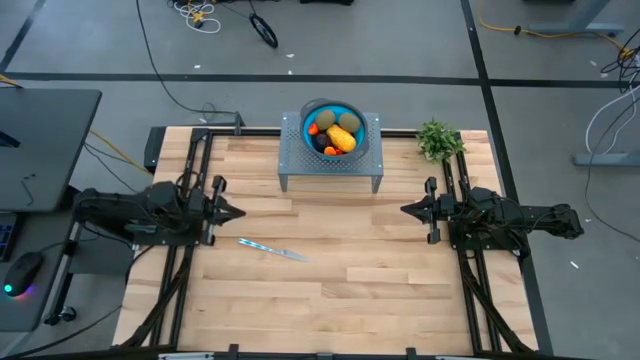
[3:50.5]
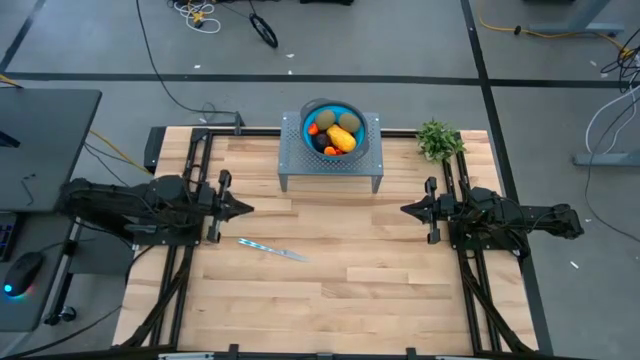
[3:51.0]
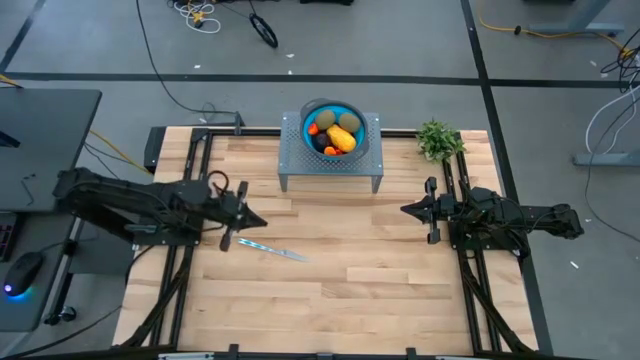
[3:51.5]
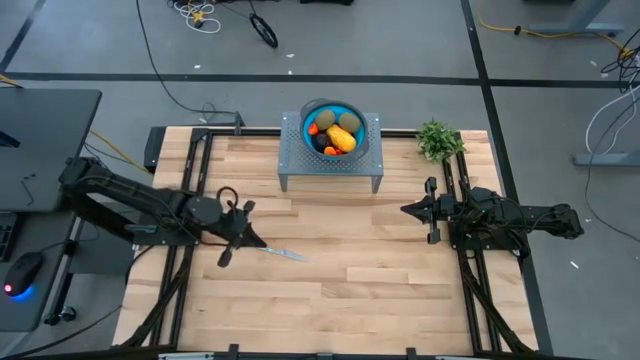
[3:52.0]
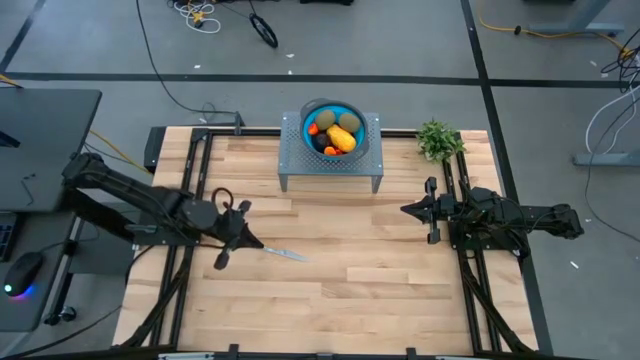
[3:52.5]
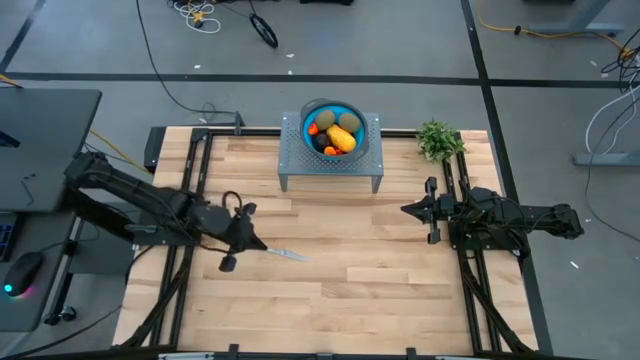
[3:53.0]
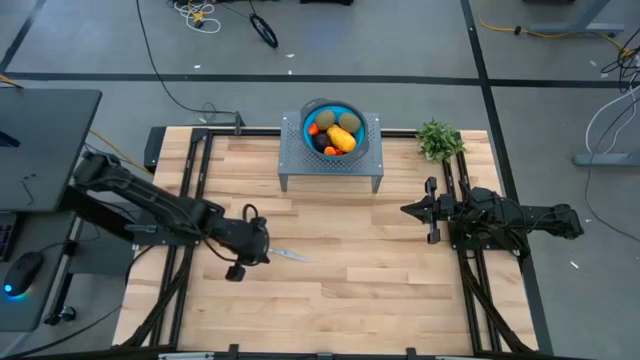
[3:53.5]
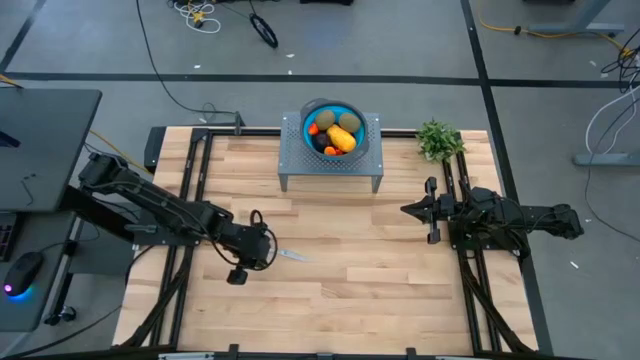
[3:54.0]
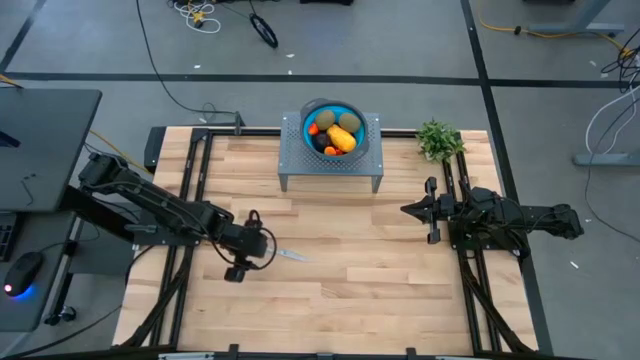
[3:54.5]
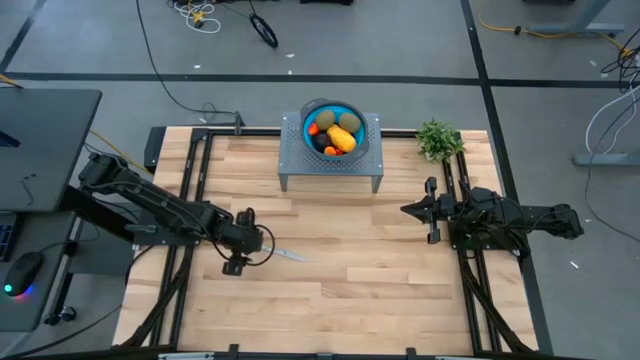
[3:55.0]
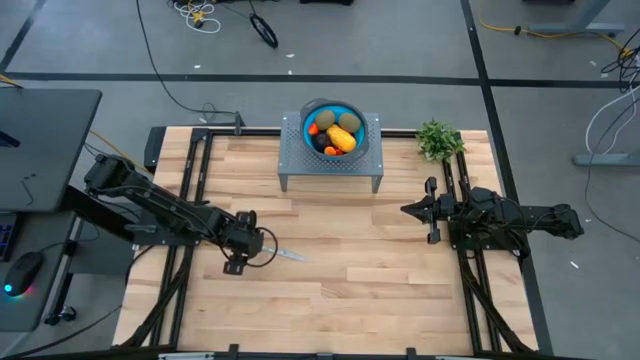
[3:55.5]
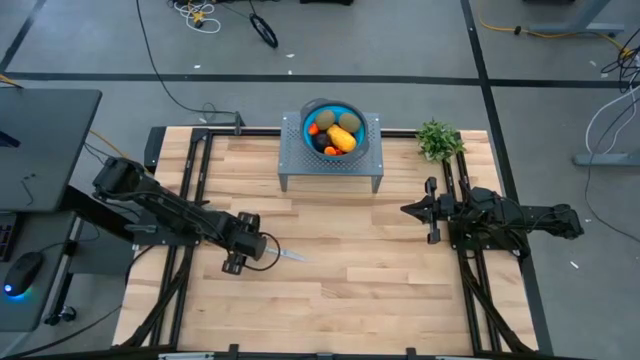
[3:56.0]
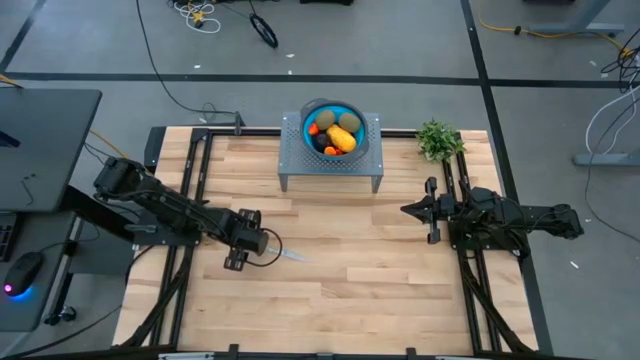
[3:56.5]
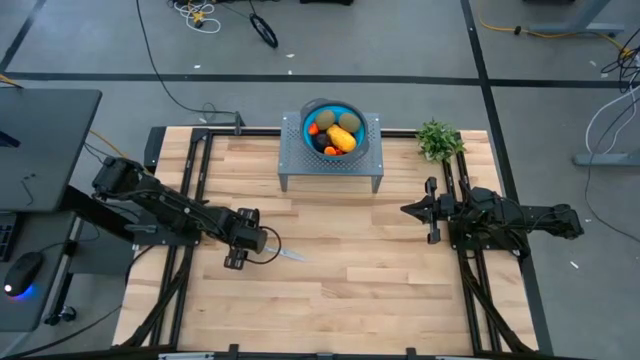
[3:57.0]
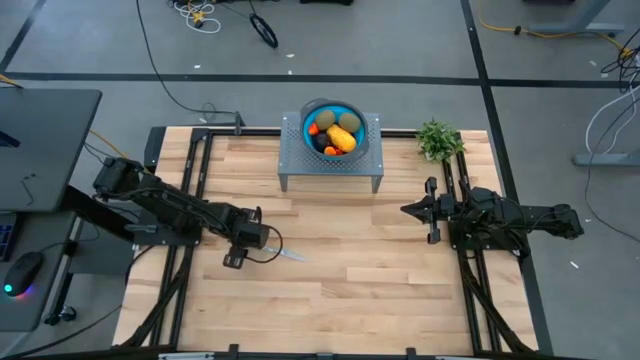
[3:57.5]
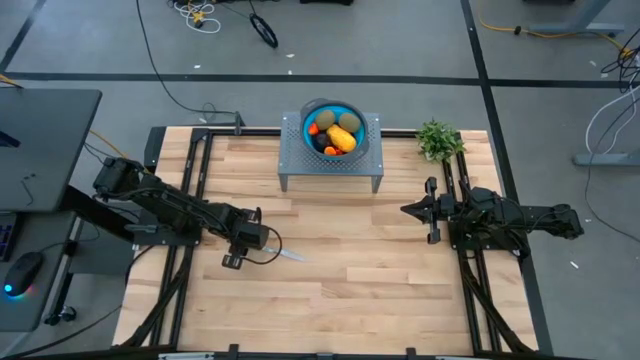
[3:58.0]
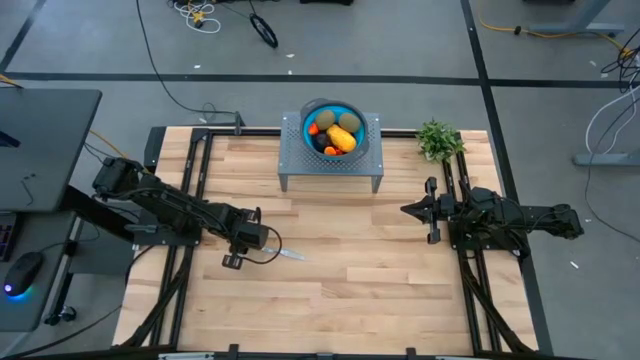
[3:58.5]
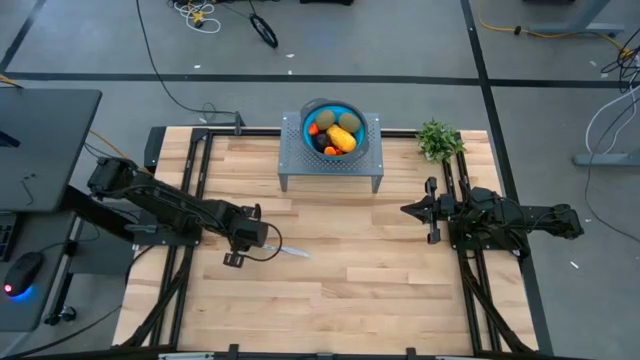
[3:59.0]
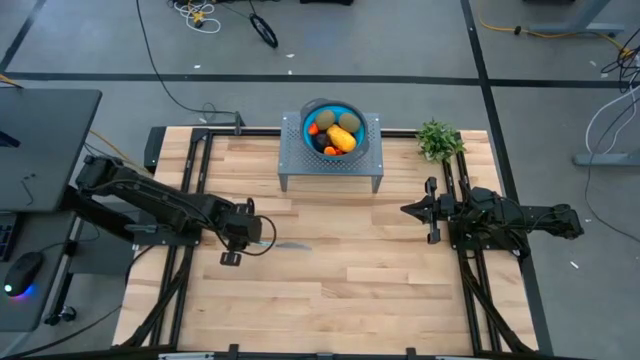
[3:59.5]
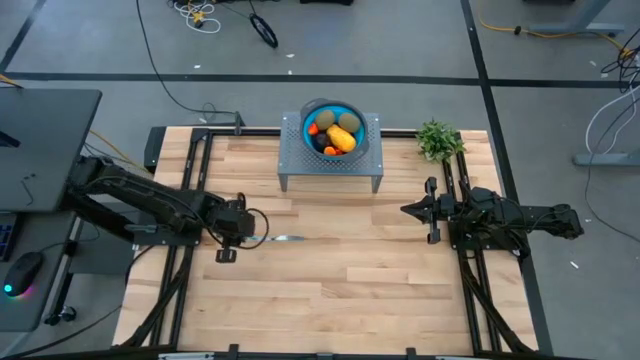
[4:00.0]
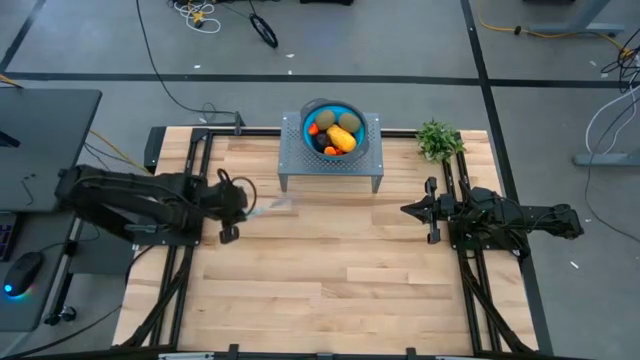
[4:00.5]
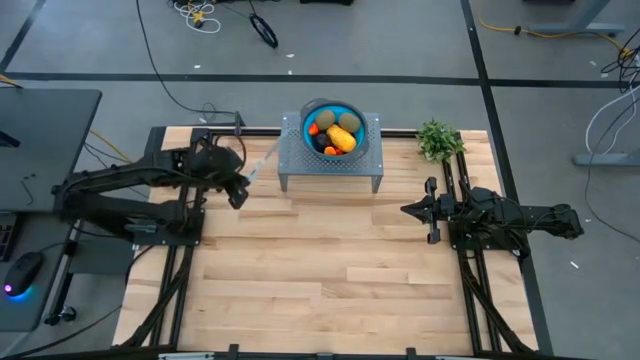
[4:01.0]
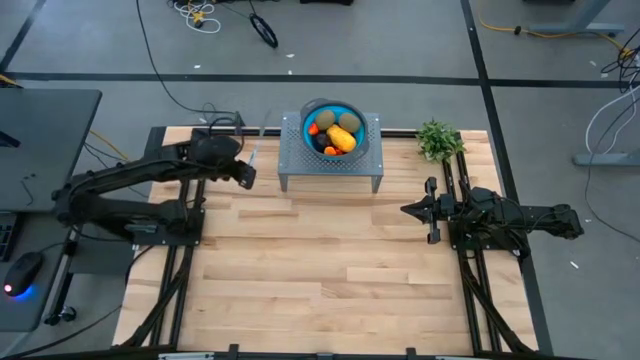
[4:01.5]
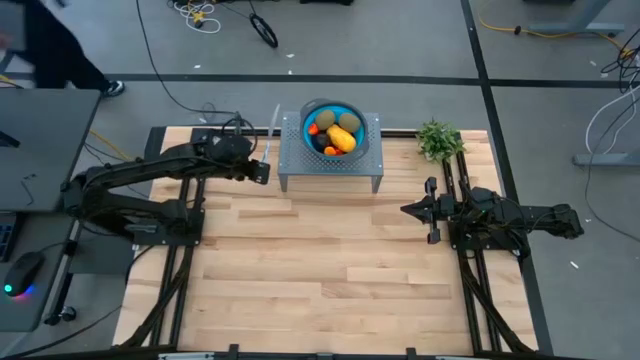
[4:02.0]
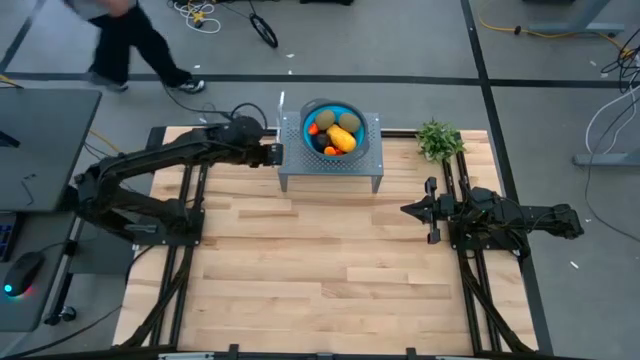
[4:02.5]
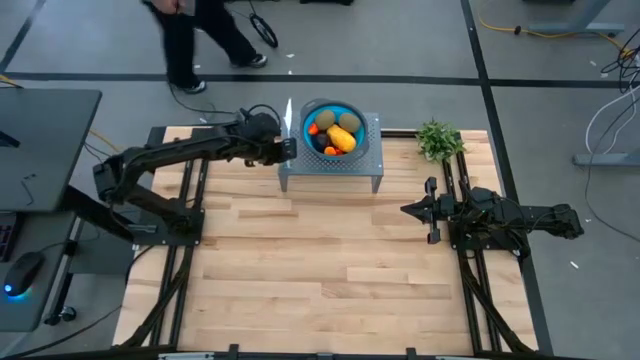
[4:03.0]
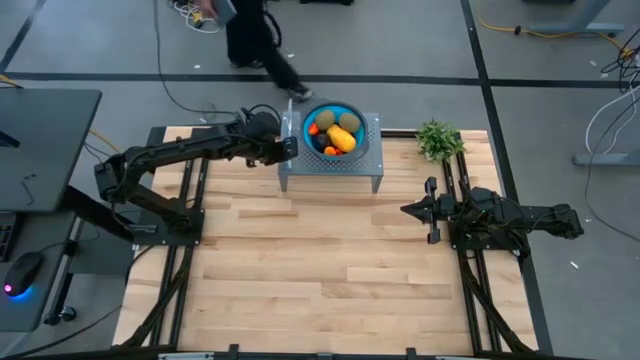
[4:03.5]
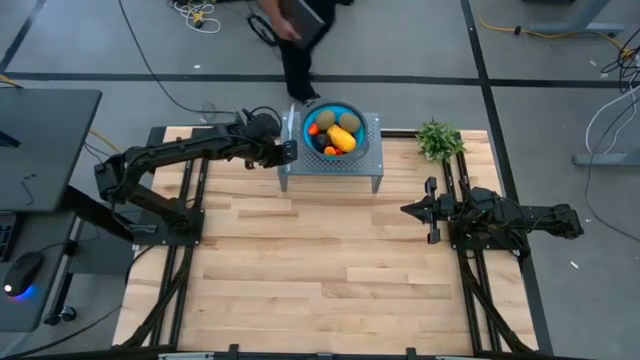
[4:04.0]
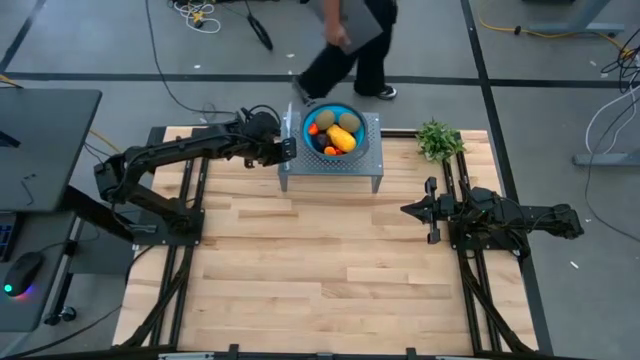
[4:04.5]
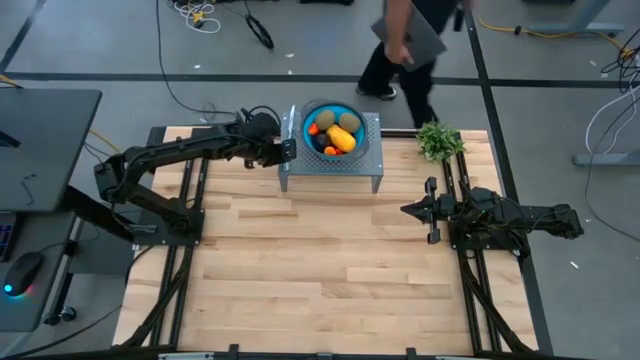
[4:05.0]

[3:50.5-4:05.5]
Task: Pick & Place Fruit
Put the knife on the shelf
